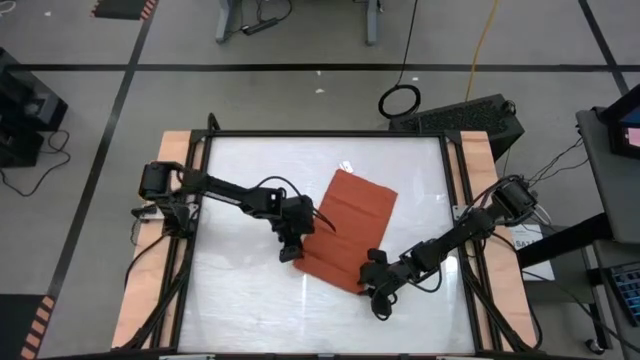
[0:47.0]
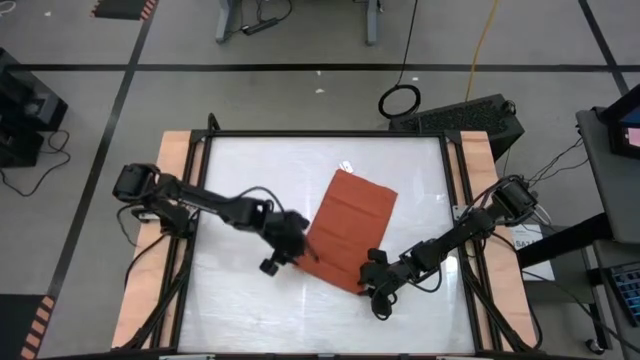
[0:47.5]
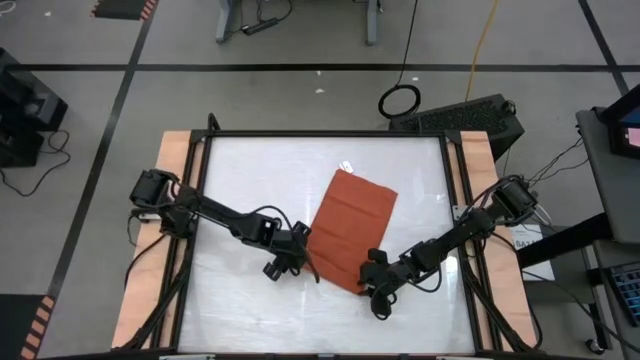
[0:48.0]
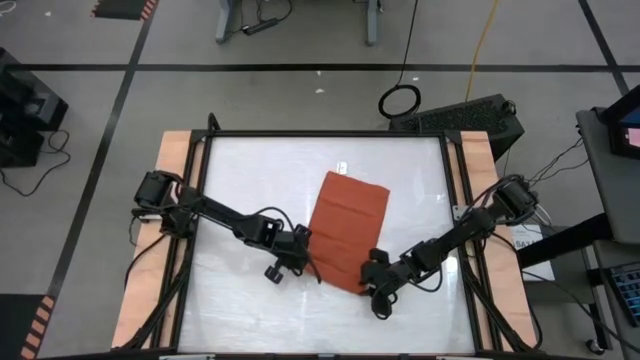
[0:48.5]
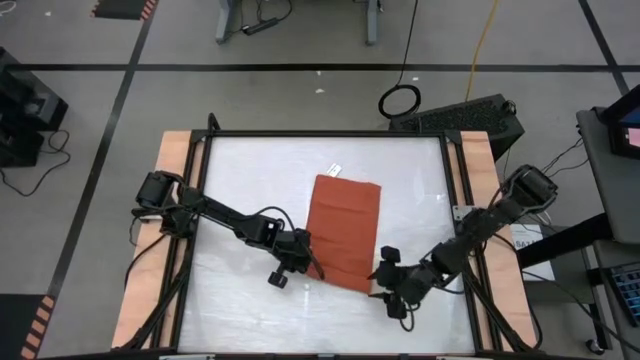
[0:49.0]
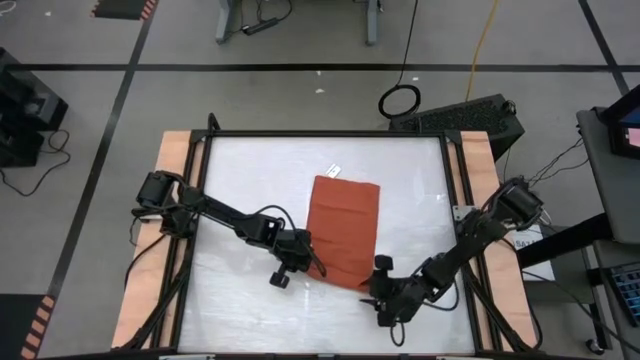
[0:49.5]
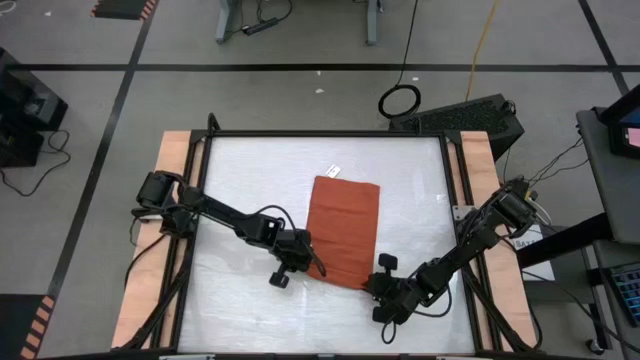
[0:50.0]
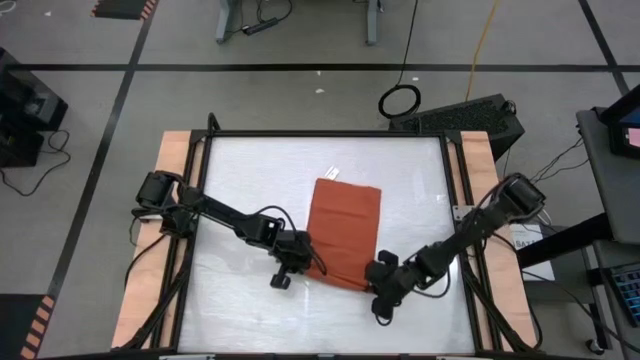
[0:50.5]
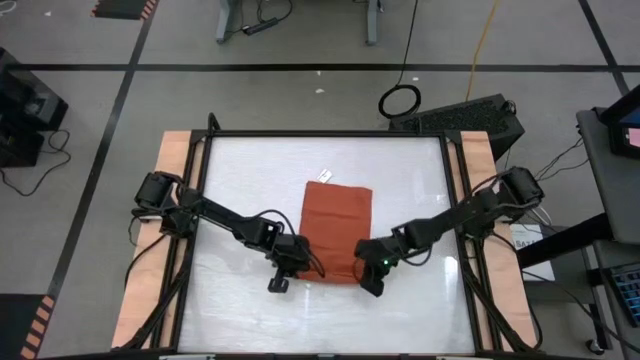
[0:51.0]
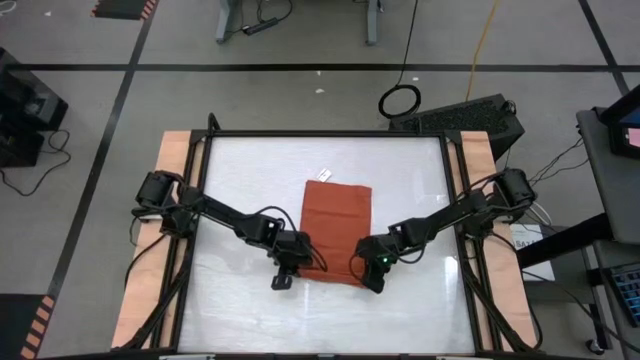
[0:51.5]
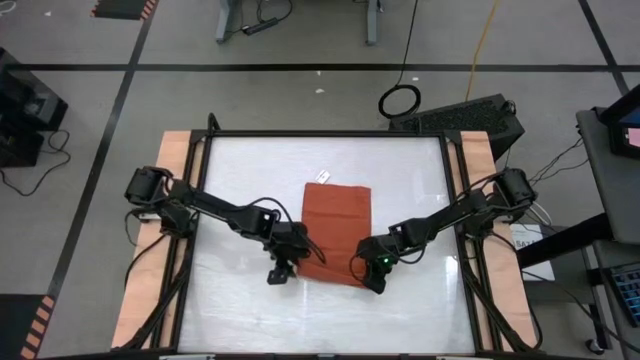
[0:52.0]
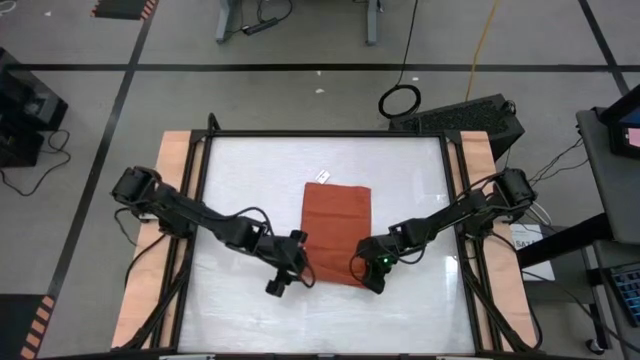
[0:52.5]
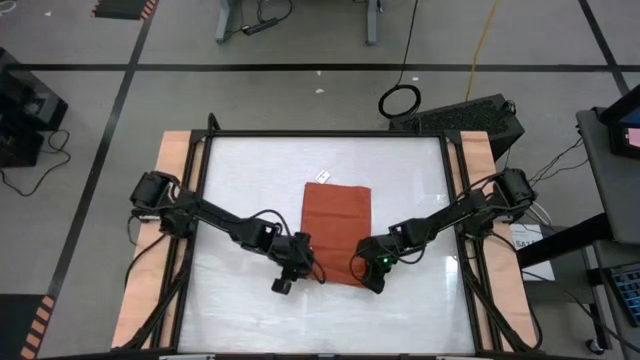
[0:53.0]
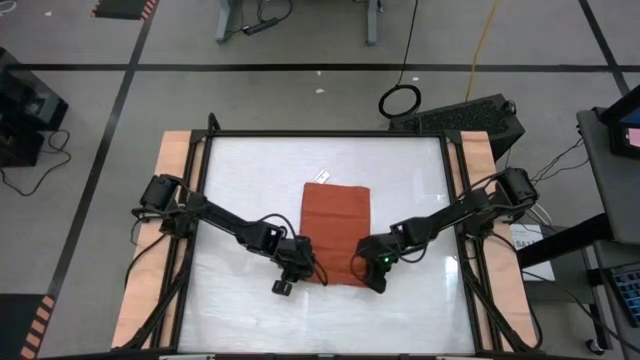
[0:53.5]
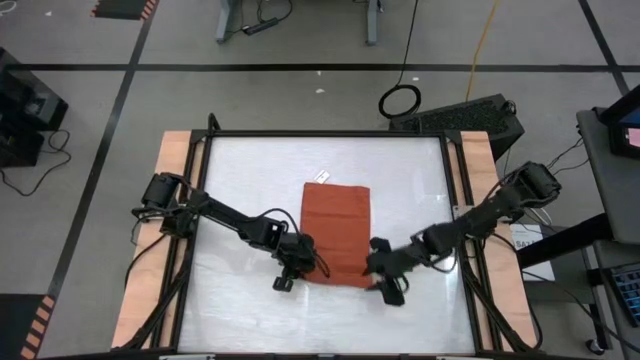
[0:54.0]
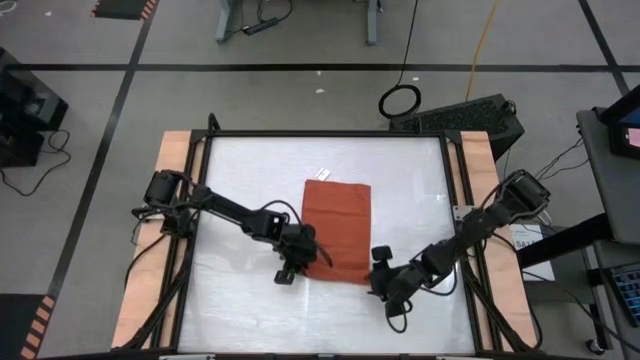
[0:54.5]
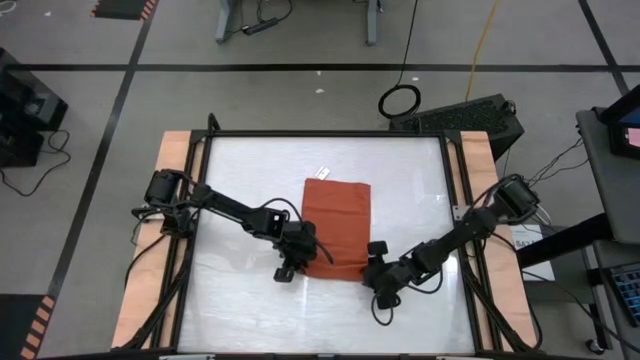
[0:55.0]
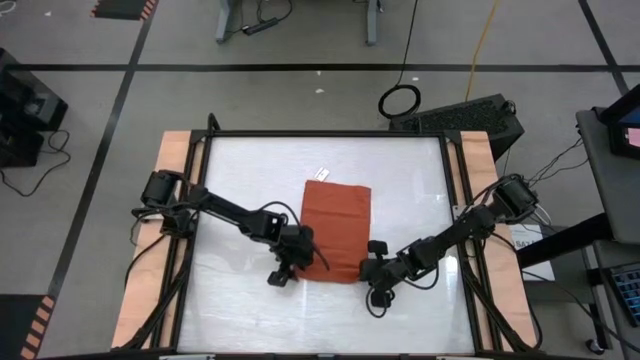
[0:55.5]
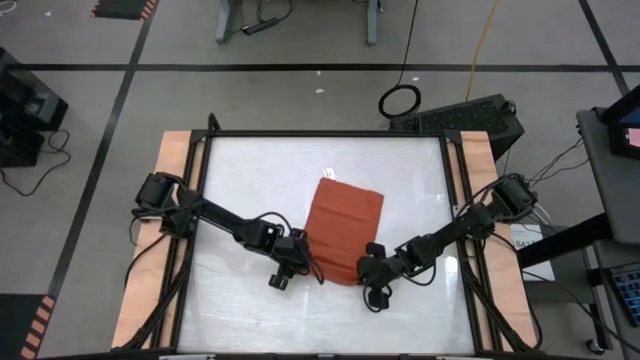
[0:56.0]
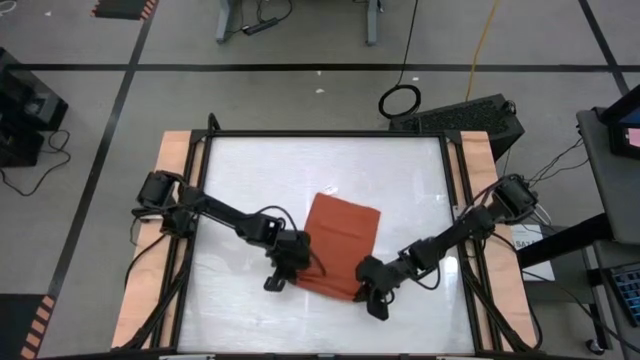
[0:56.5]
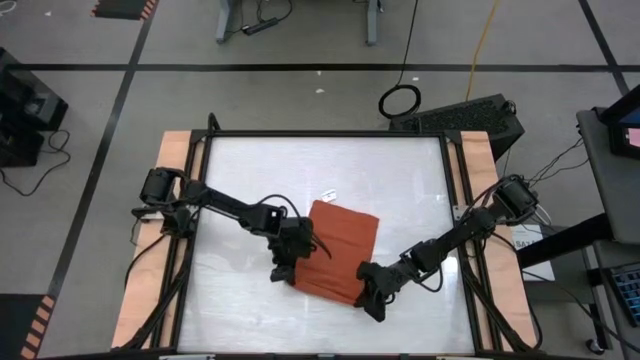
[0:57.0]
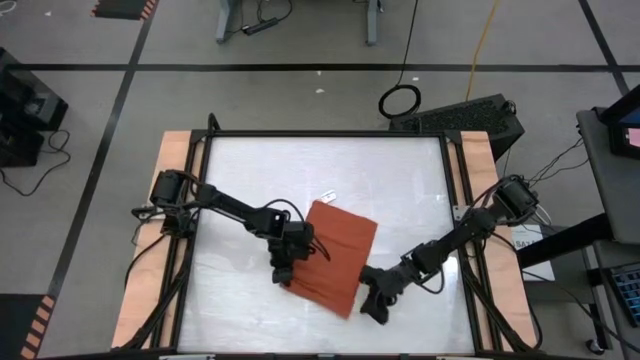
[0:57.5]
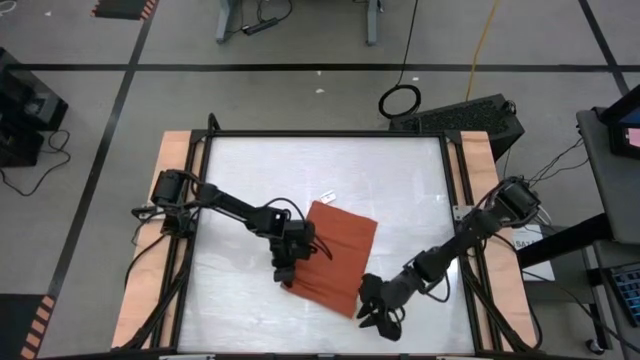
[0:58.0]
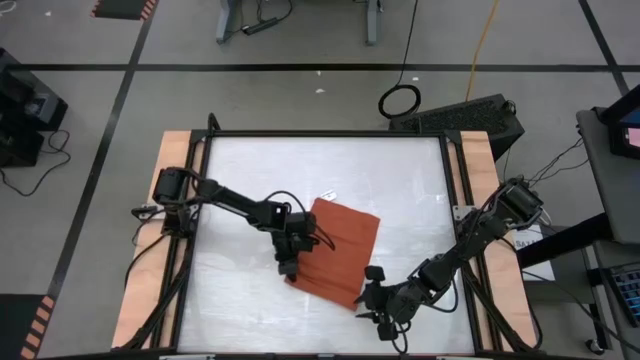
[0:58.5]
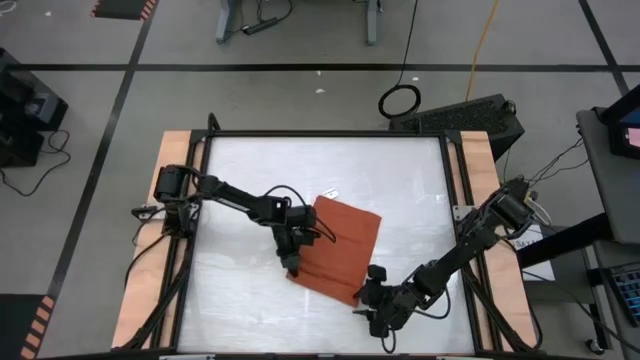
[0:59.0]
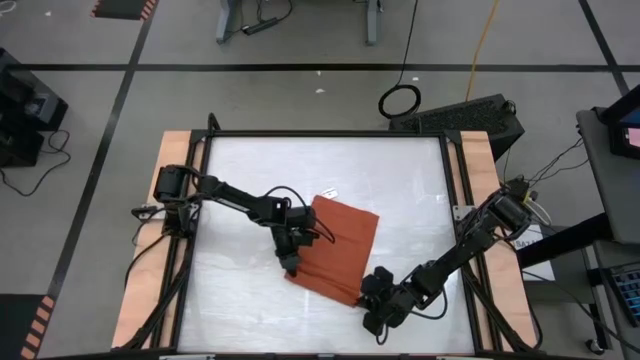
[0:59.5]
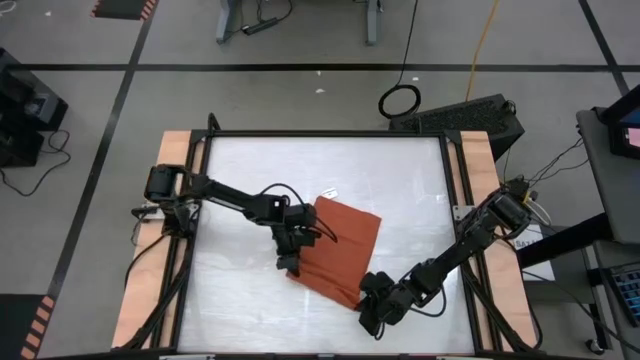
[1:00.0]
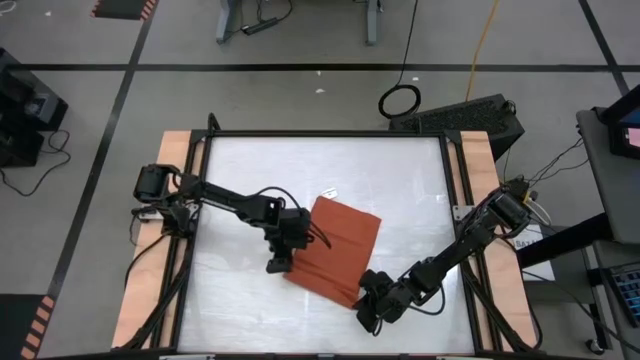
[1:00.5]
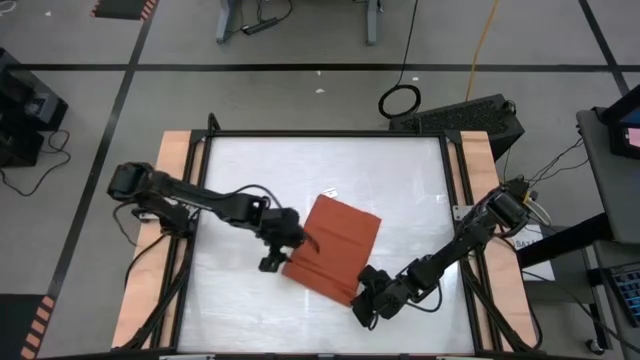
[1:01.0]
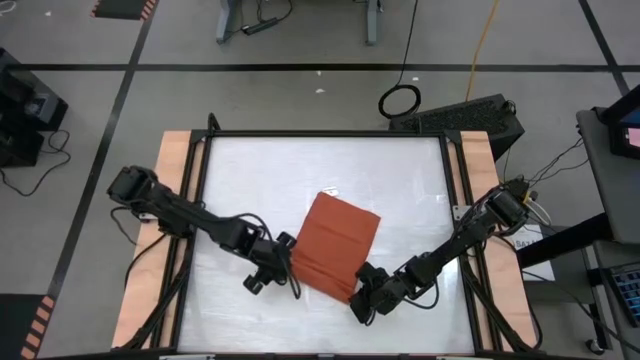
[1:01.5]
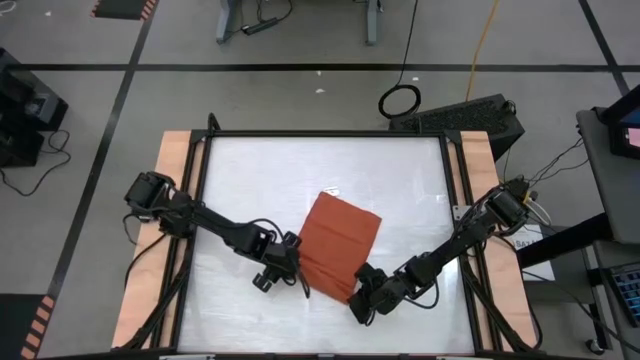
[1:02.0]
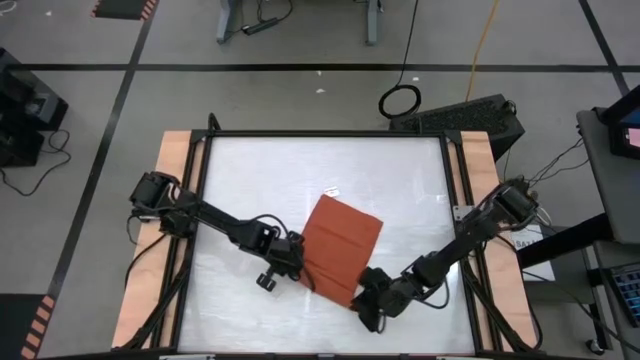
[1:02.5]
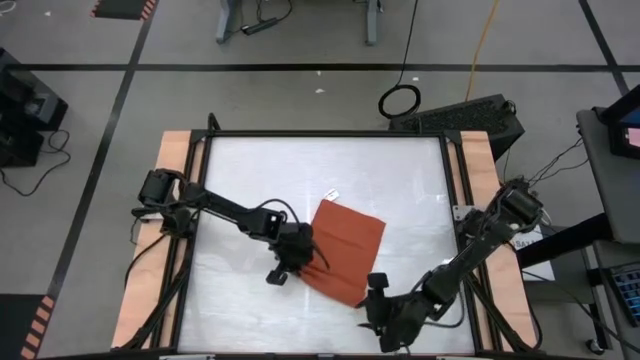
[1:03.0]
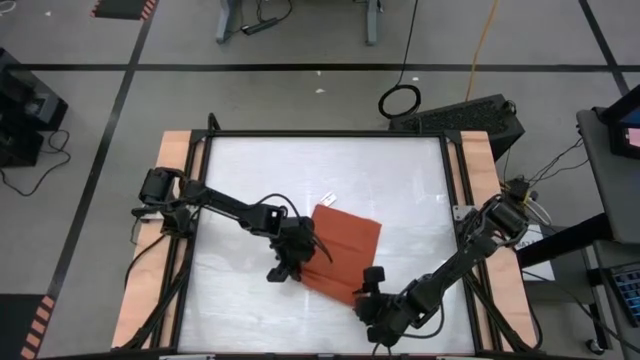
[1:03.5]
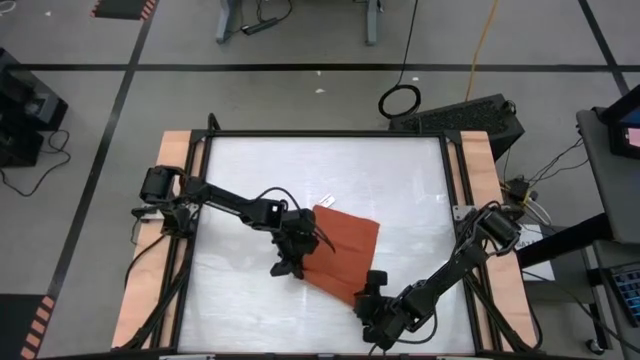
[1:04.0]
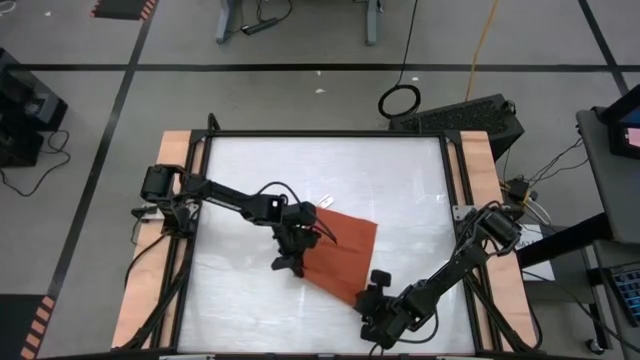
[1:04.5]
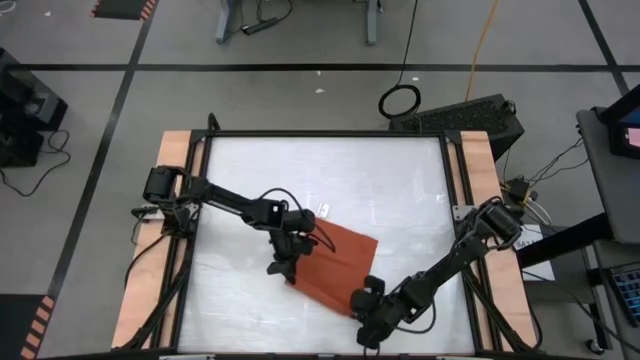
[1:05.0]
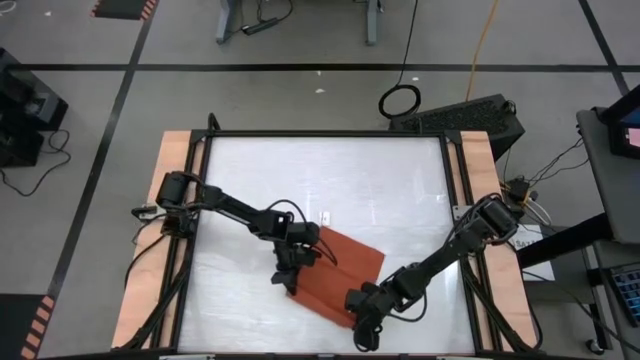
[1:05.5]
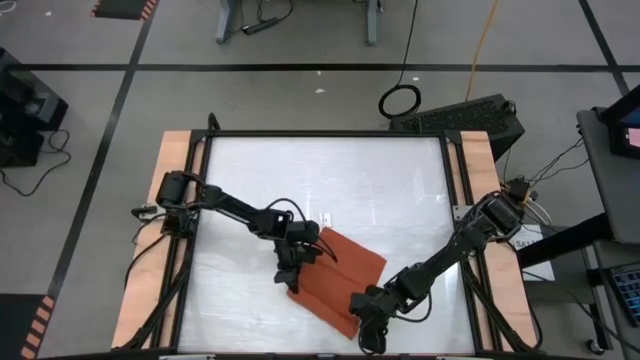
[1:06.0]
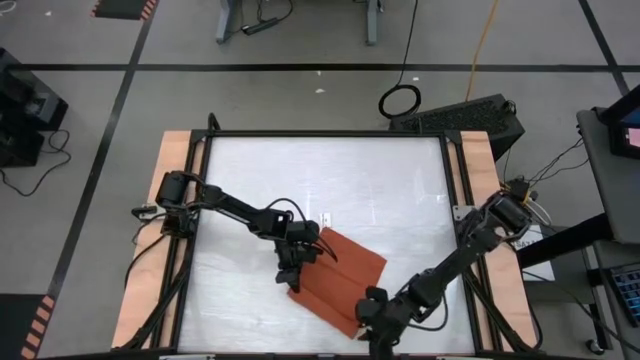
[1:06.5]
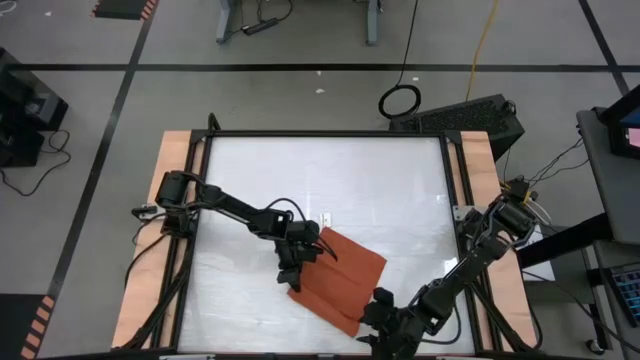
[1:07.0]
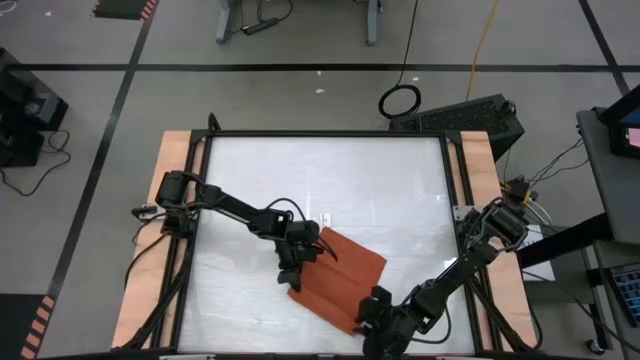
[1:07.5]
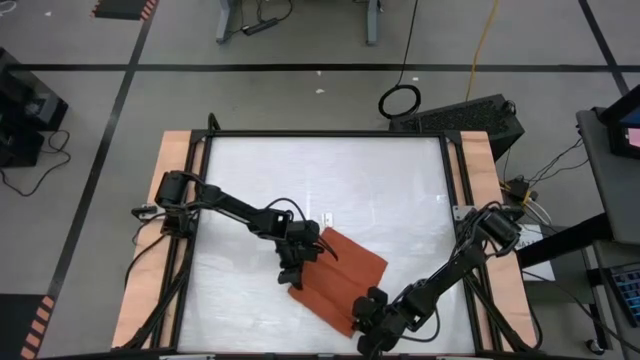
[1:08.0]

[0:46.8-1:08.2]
Task: Roll towel
Roll the orange towel
